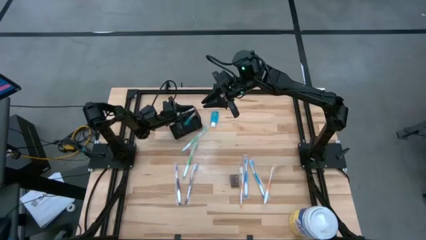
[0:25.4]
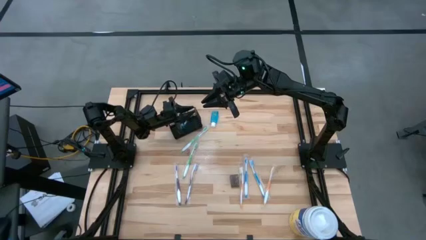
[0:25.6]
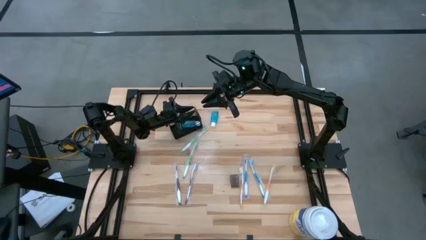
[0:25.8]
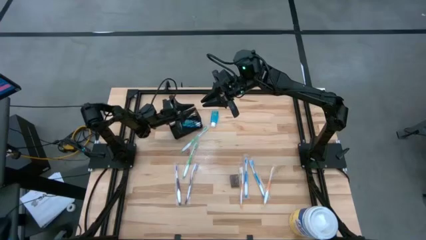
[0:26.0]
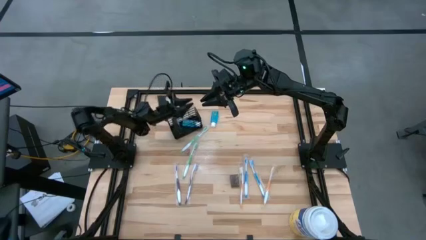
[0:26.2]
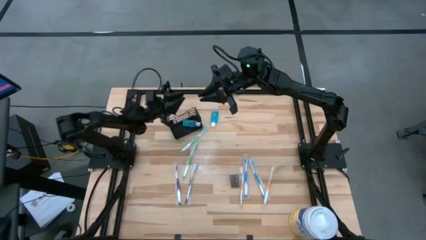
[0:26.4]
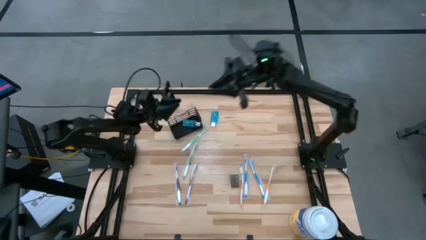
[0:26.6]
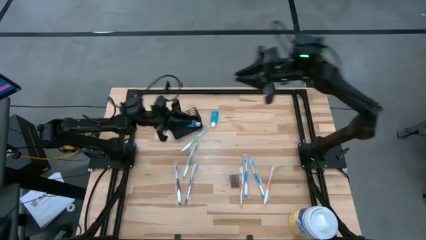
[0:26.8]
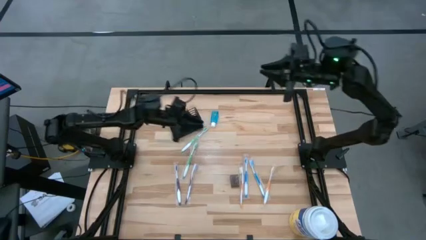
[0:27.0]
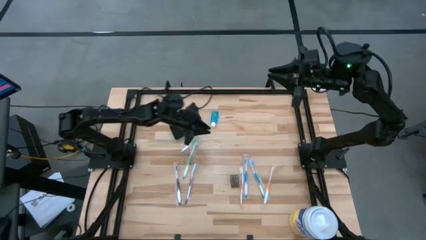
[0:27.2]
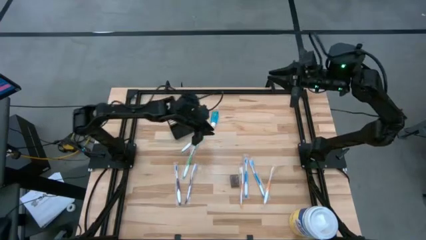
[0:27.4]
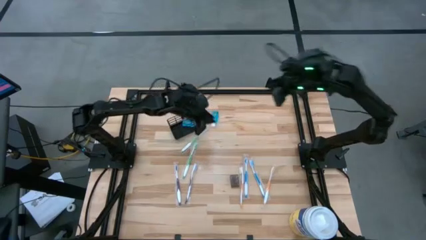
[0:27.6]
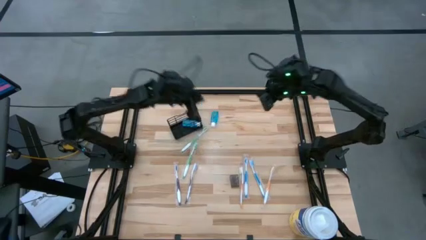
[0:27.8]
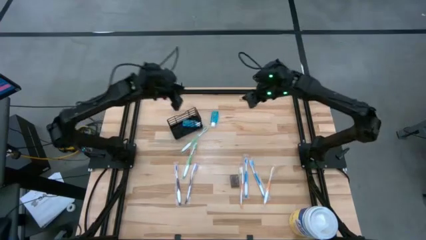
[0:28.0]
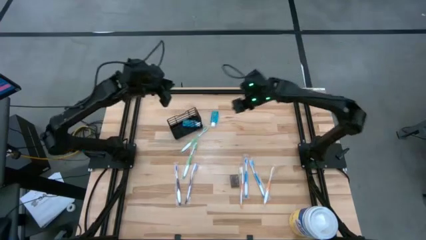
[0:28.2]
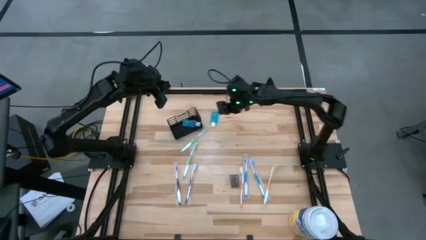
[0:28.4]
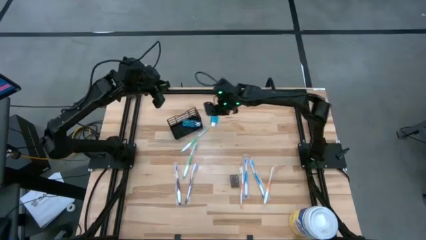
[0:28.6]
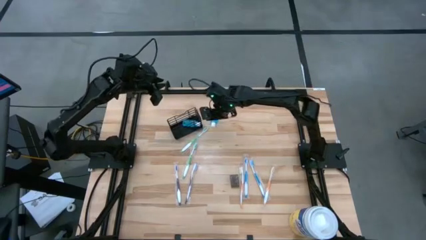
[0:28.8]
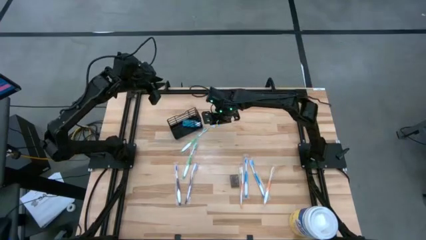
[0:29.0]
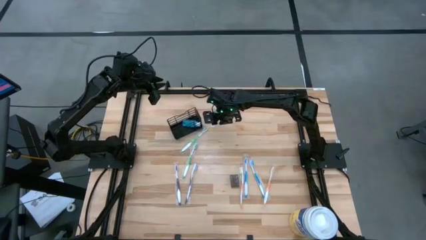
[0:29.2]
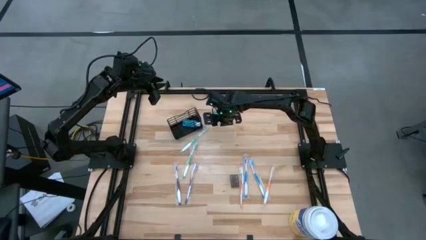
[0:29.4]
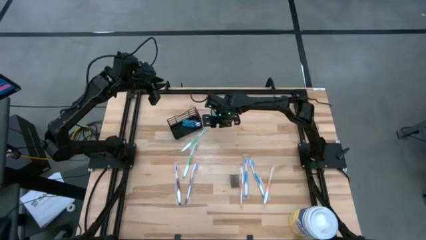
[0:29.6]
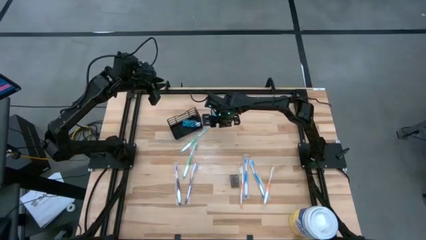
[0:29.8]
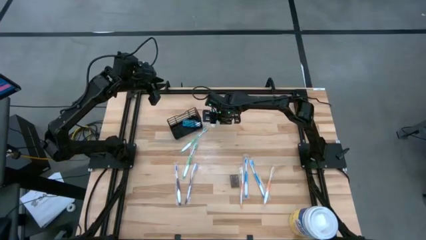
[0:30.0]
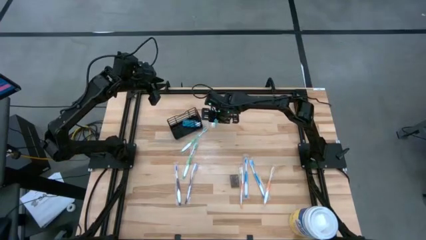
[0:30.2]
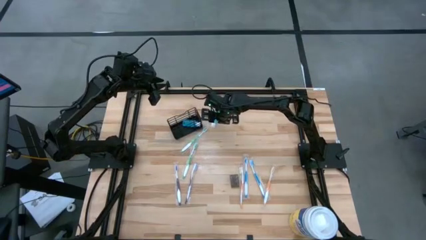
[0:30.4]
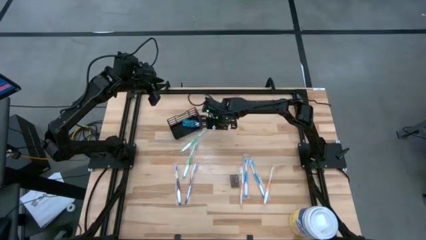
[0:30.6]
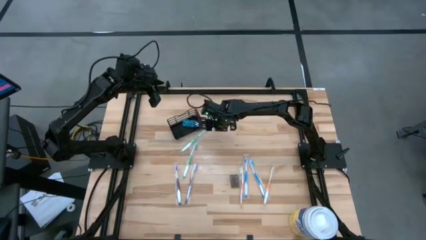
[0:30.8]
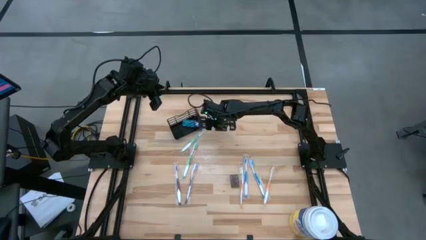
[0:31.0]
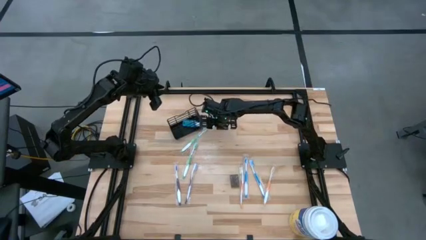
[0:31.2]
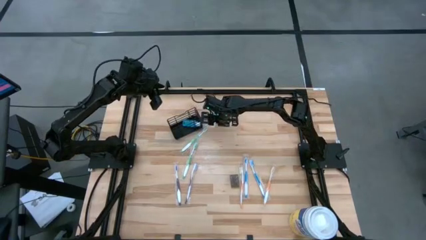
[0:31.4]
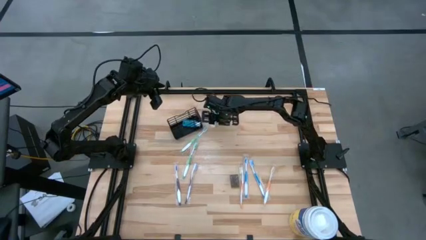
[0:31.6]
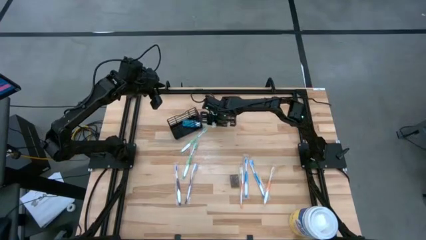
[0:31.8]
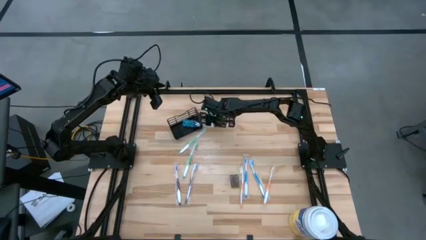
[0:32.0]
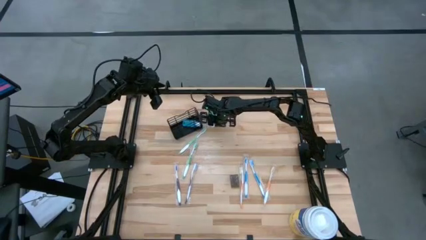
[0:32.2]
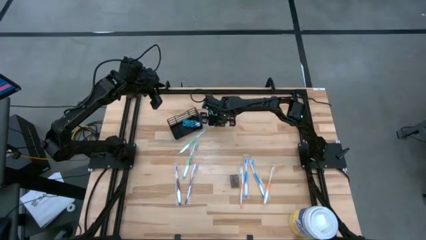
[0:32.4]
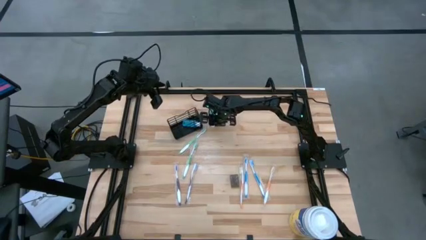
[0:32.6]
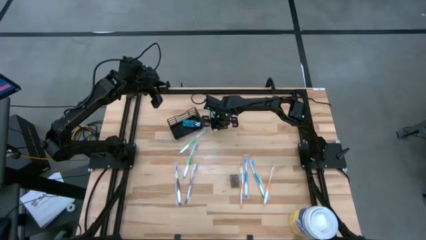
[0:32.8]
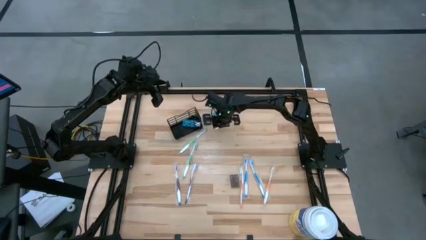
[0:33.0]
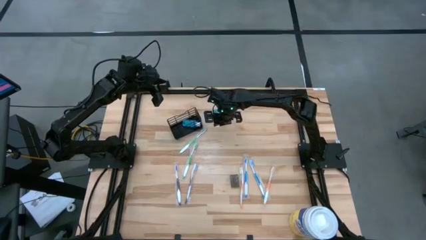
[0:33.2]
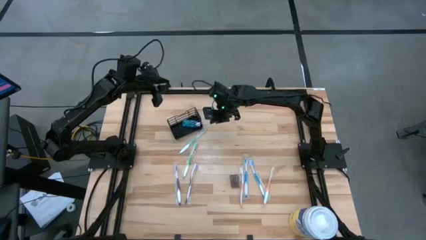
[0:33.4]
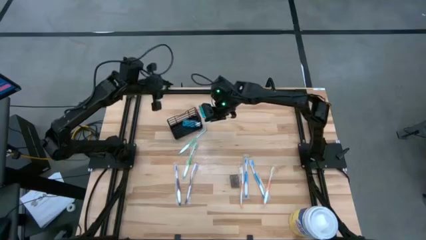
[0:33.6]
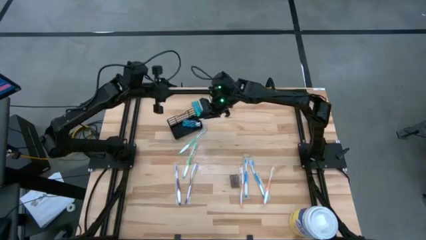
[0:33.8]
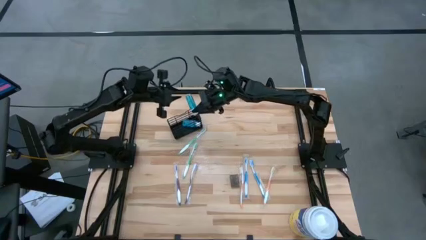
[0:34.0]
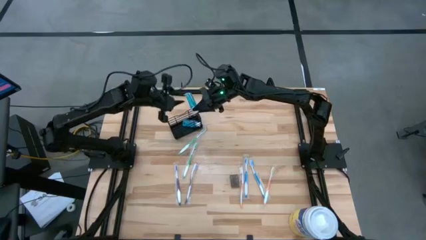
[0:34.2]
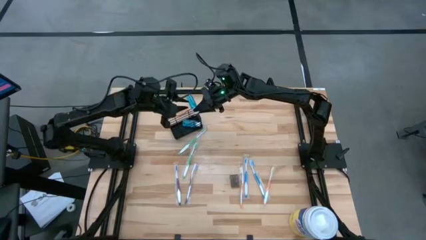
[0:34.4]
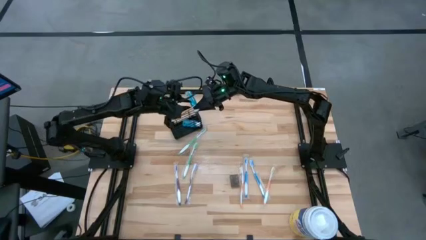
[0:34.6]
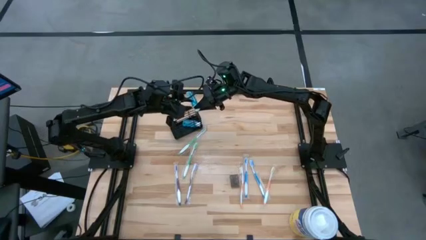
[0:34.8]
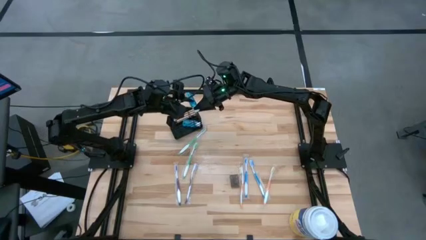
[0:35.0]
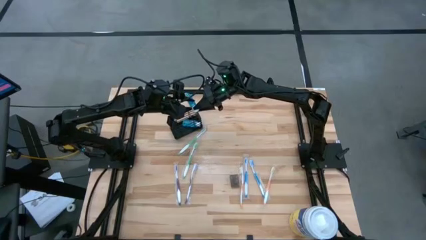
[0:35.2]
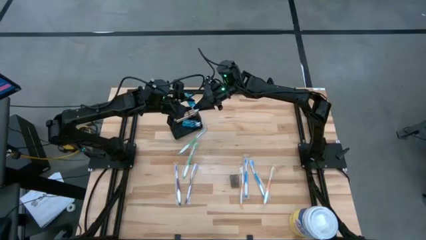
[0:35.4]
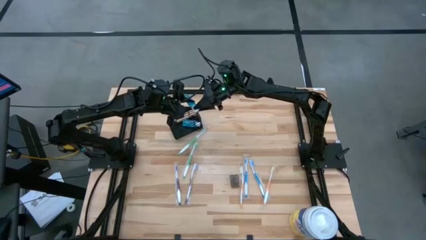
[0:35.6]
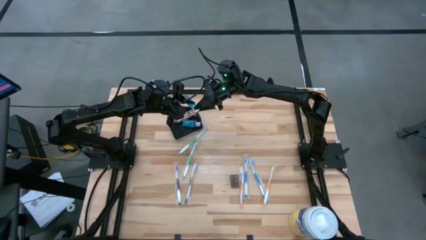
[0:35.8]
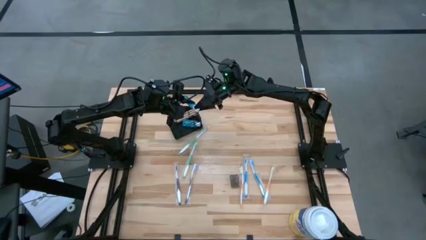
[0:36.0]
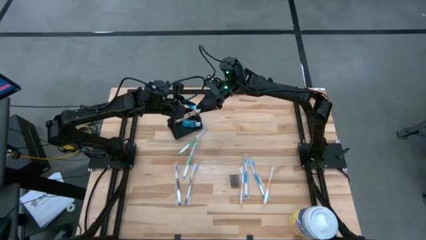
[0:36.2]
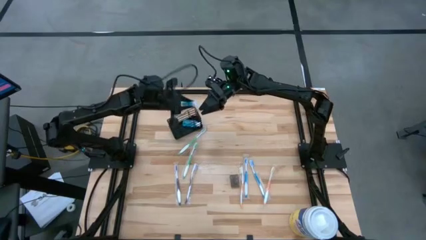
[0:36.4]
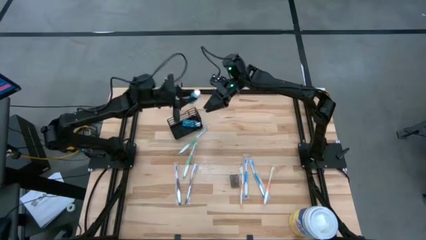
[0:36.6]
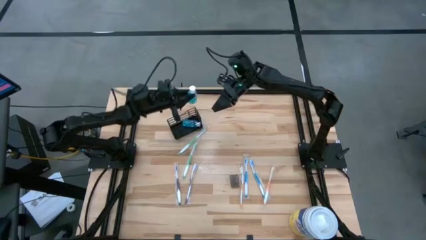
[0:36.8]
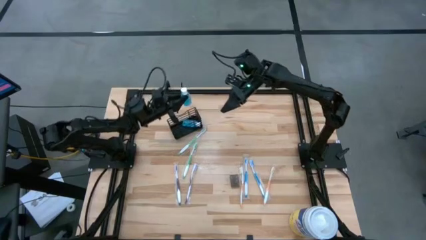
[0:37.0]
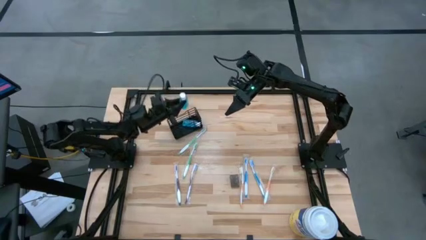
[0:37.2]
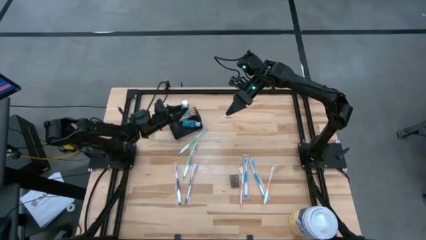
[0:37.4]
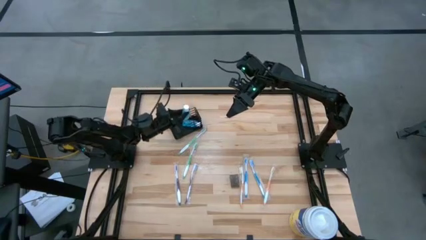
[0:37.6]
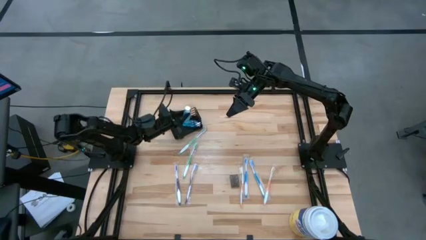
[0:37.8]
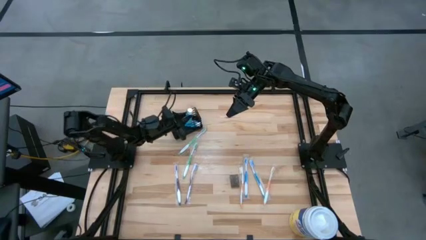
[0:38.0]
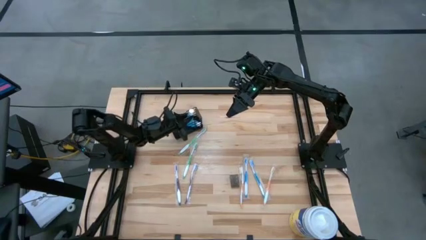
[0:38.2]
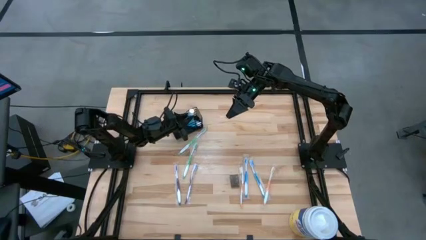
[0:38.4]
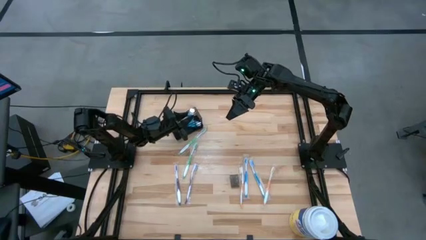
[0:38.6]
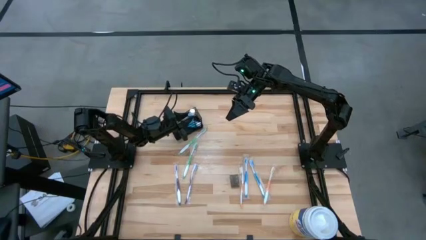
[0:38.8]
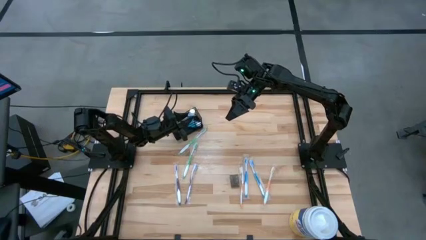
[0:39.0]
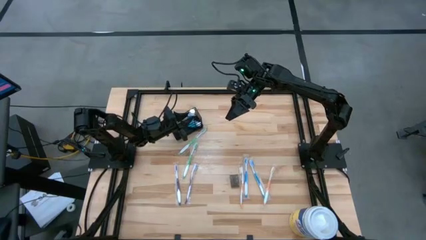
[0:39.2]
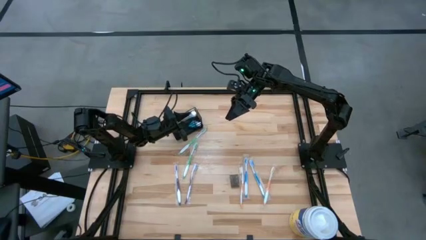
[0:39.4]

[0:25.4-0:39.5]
Task: Pick & Place toothbrushing station
Put the blue mouthwash into the black organizer
